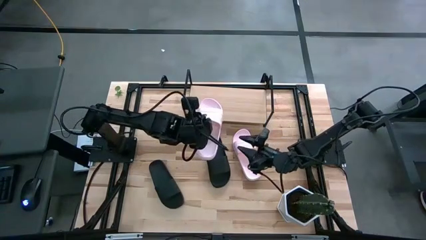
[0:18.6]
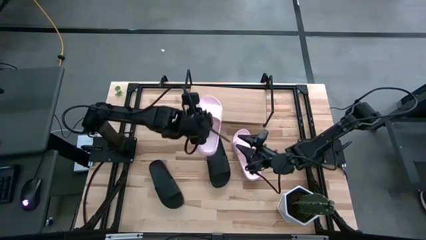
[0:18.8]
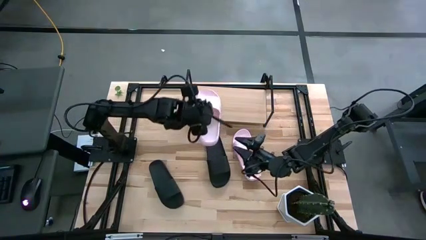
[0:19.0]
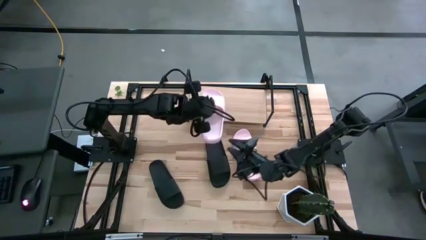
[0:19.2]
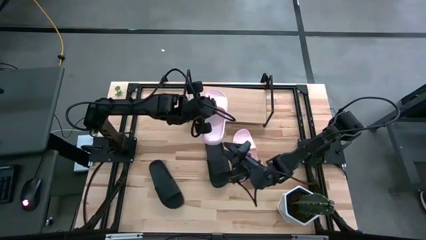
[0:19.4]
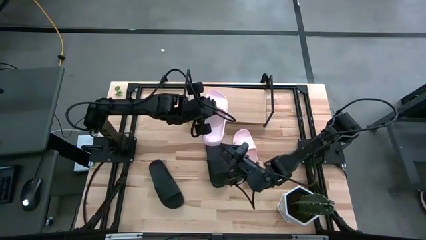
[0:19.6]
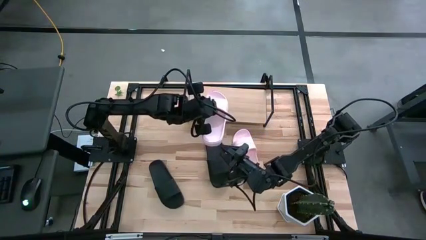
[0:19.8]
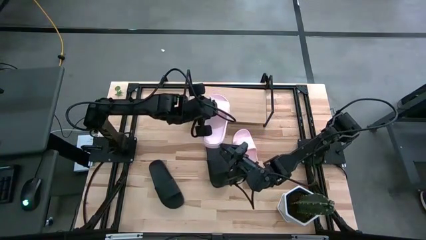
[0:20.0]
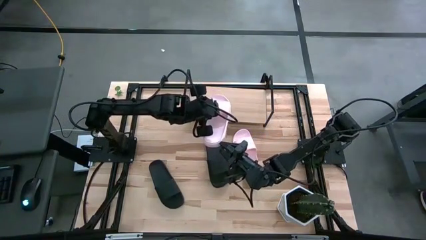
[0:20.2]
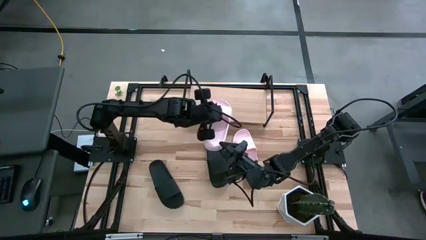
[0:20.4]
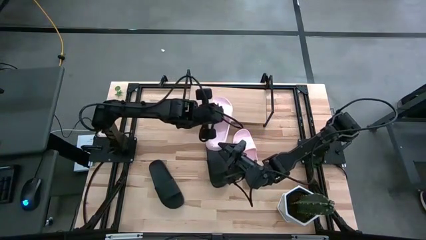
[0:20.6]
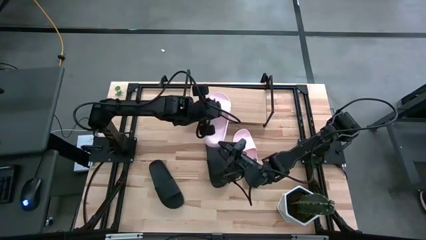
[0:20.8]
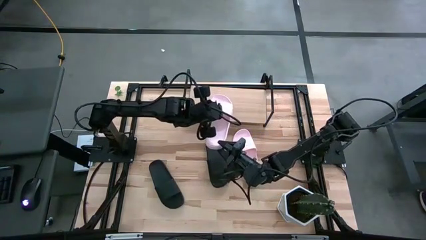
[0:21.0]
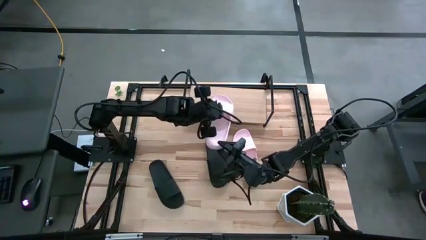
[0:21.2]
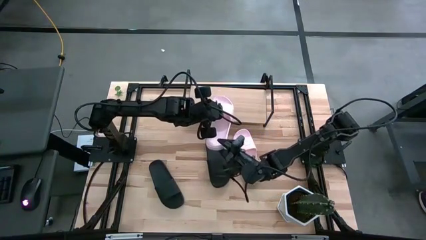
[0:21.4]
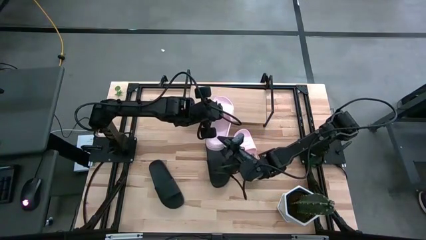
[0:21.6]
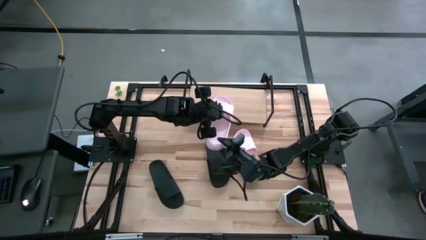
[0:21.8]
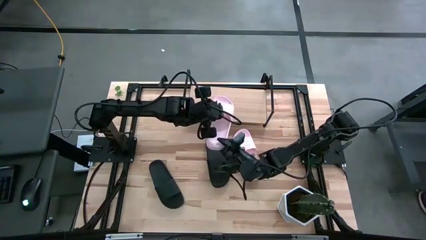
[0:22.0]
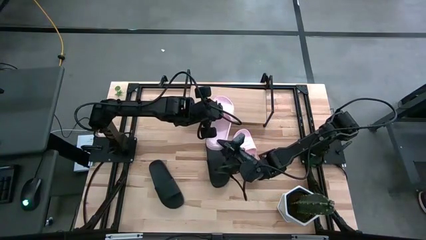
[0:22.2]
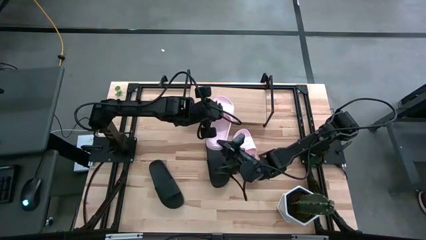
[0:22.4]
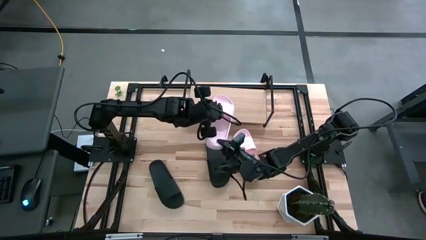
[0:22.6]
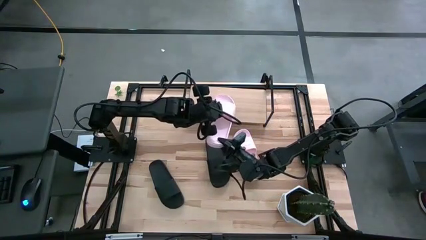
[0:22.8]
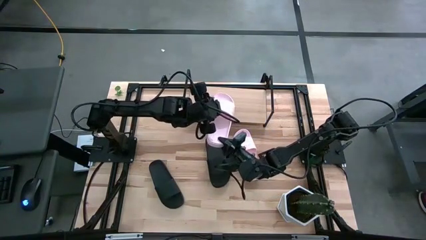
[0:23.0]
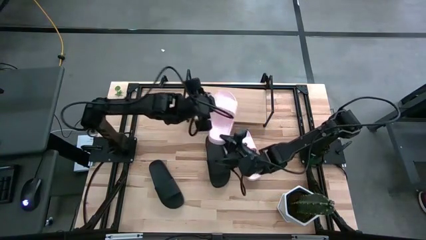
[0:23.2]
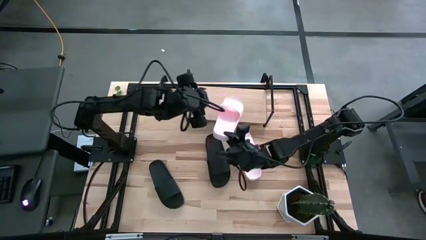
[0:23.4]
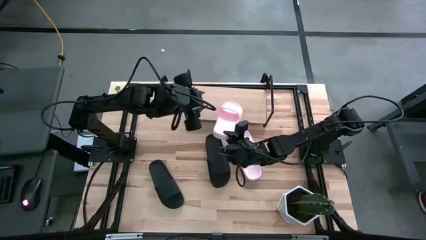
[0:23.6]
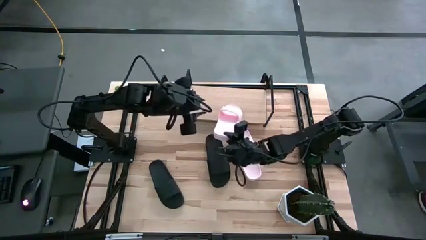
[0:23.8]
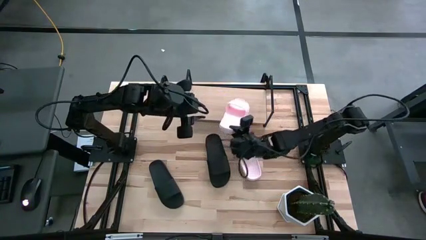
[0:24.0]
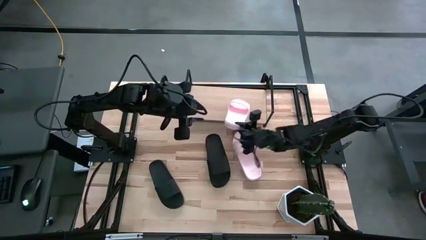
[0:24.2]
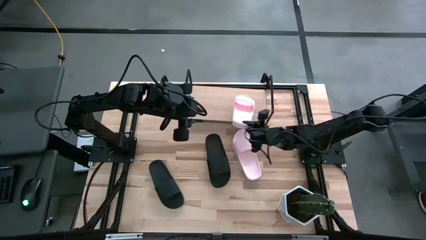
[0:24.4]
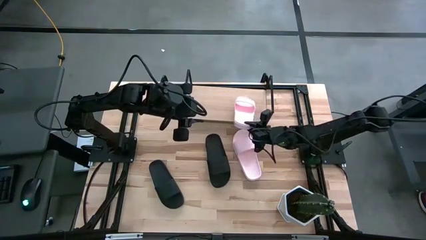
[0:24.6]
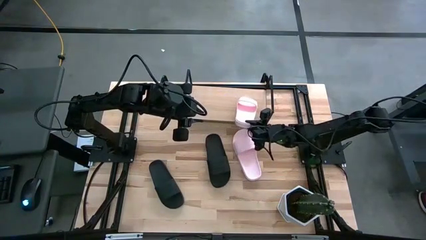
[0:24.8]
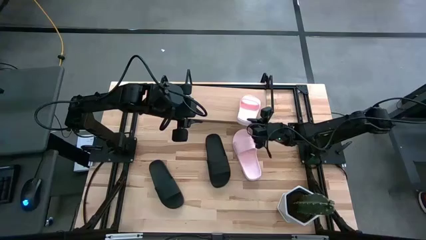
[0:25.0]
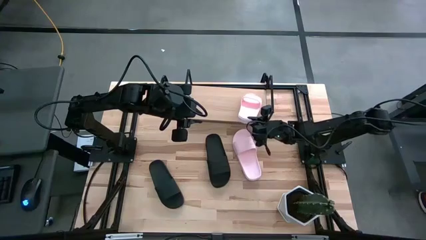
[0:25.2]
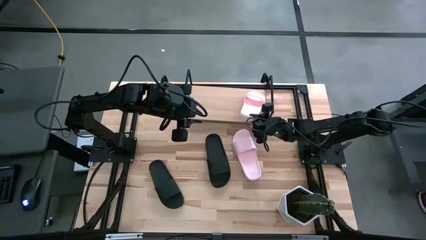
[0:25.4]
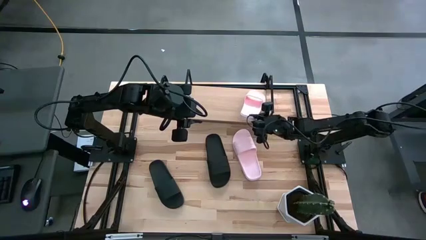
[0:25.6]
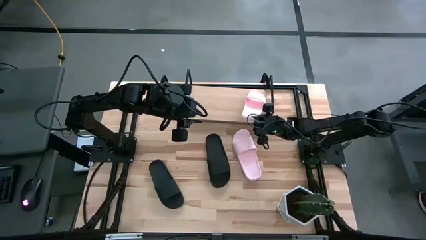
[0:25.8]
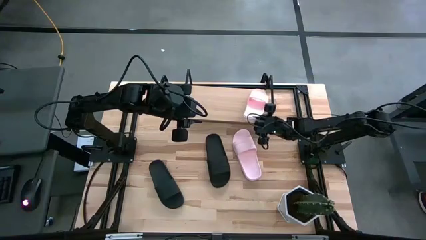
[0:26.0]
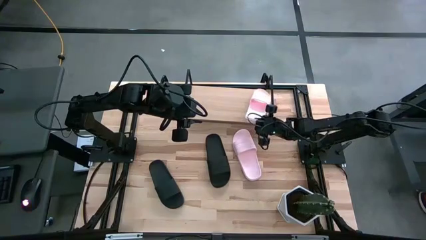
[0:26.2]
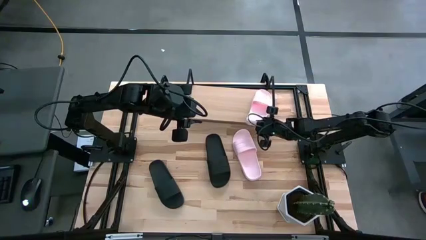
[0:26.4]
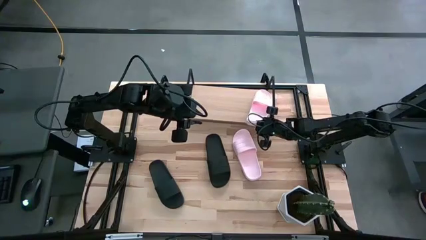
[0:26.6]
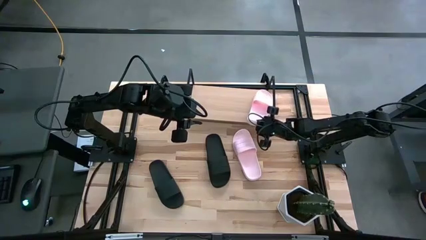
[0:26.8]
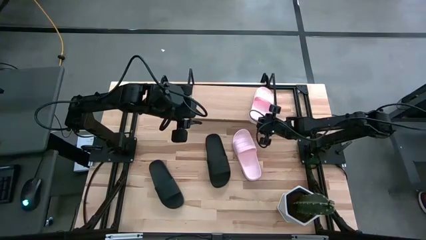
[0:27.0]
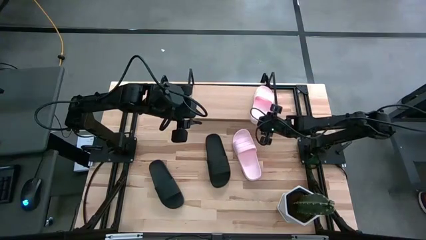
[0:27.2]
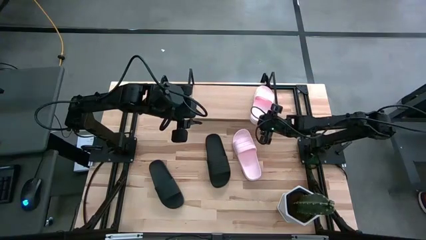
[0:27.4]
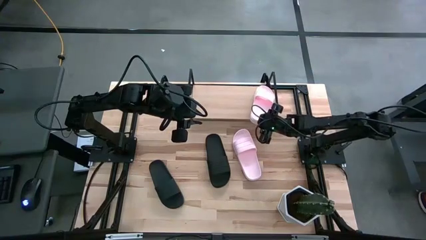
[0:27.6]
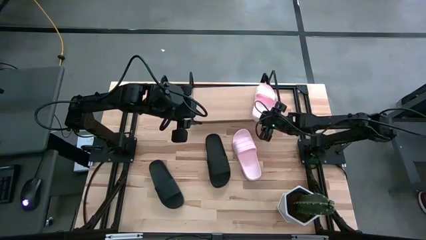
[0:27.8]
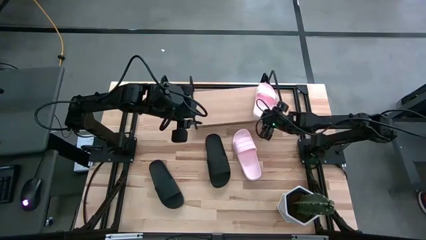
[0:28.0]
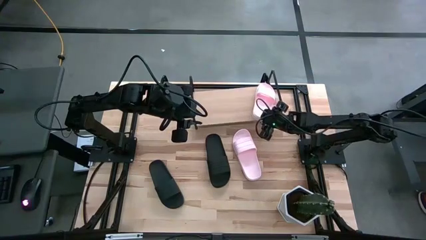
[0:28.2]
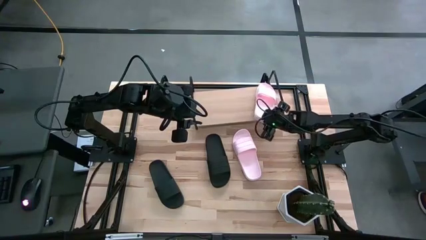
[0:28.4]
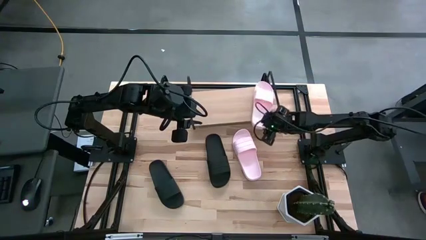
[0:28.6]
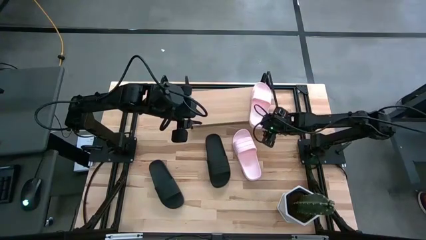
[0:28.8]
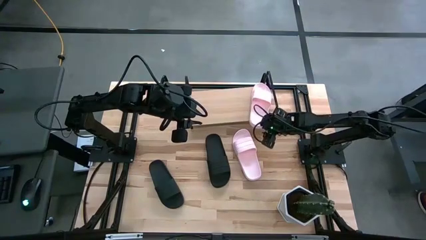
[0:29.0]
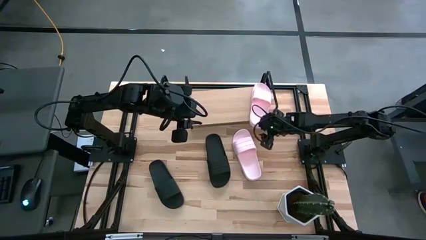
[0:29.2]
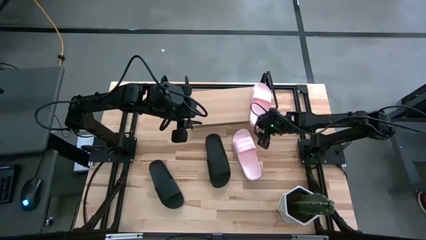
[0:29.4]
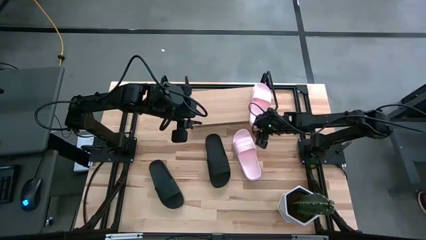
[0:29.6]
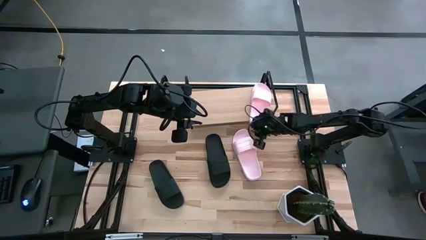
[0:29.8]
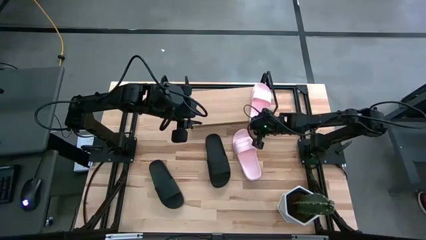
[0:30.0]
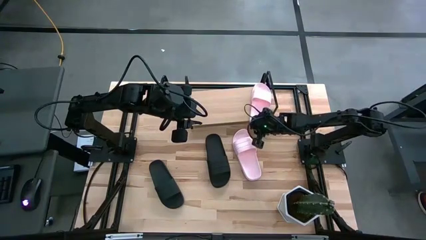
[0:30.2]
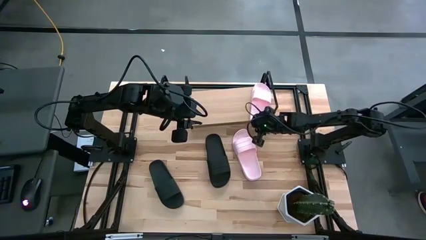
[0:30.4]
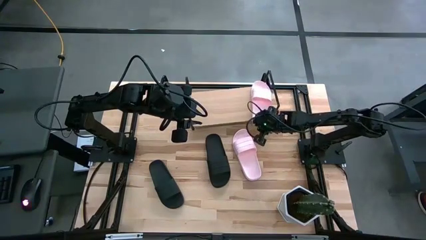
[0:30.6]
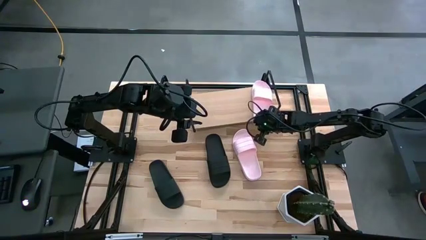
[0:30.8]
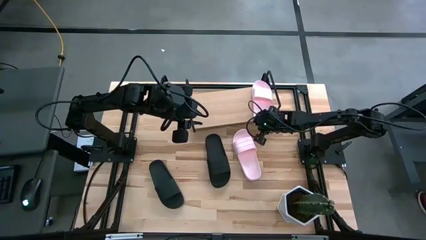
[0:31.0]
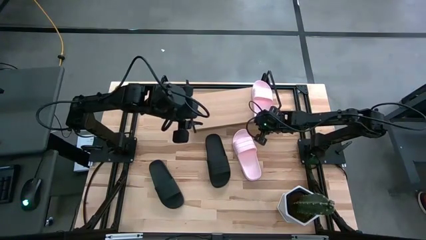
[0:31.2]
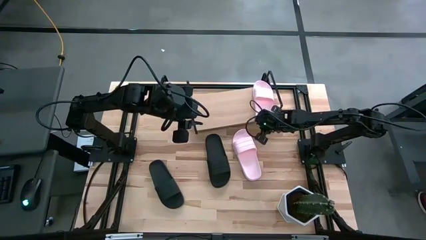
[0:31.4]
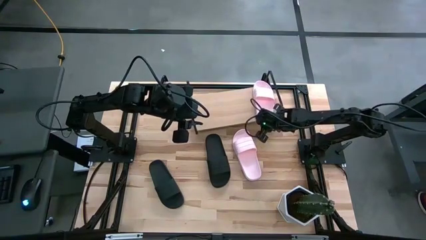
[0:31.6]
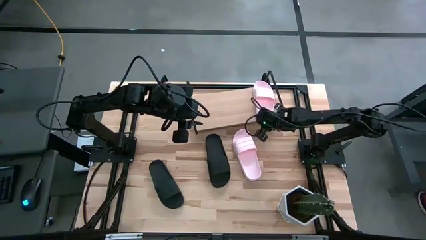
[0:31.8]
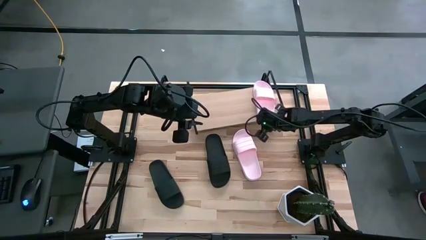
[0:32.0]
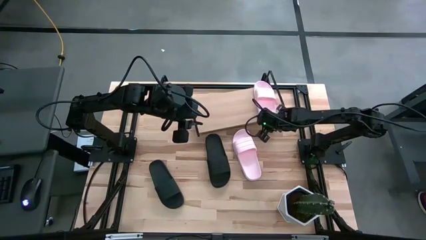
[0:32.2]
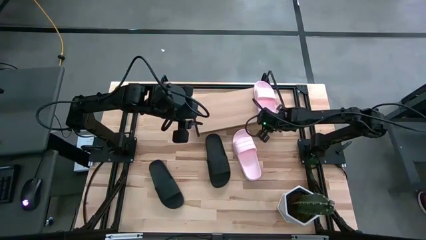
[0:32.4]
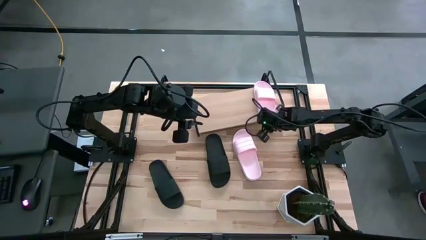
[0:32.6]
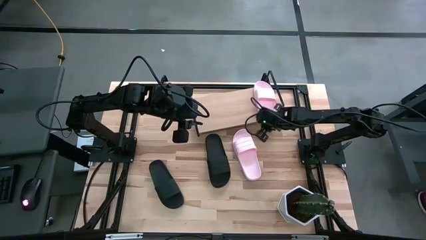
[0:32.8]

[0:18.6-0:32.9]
Task: Pick and place slides into the shelf
Put the left pink slide on the shelf
